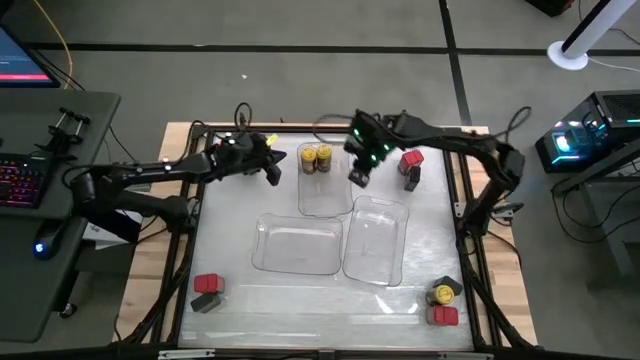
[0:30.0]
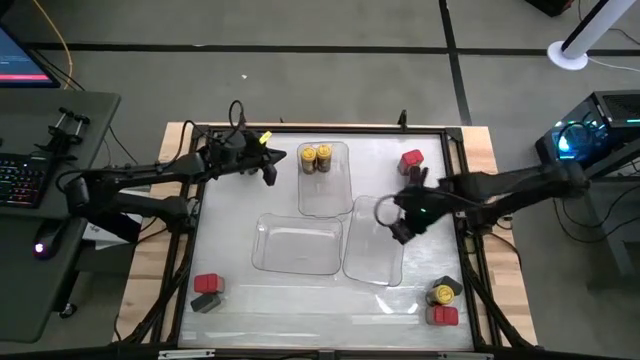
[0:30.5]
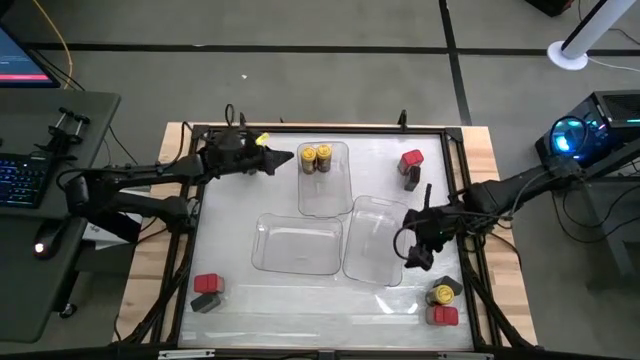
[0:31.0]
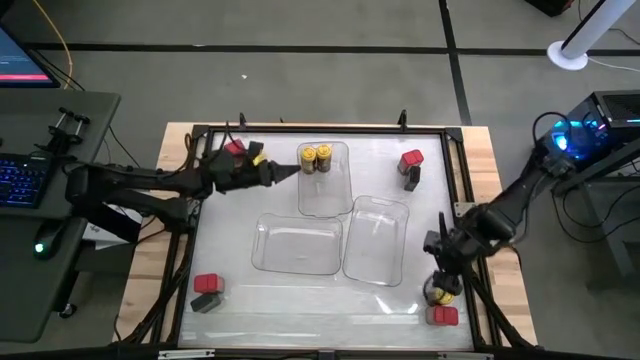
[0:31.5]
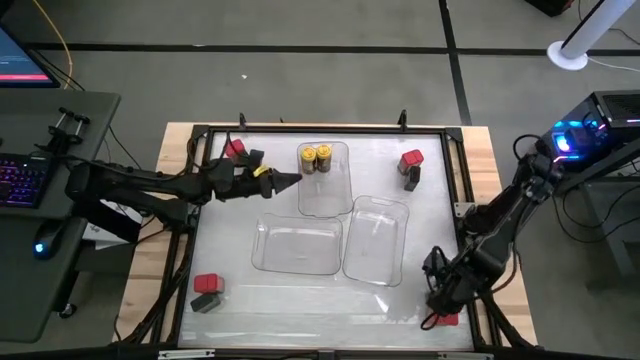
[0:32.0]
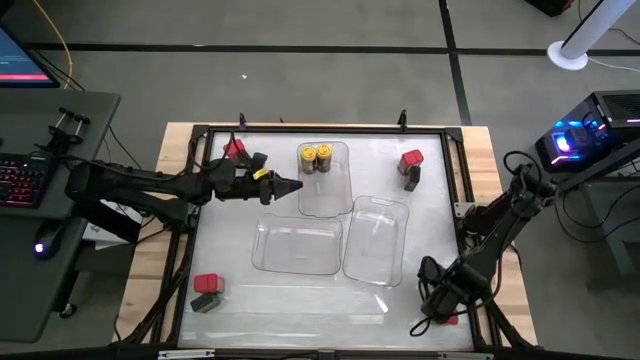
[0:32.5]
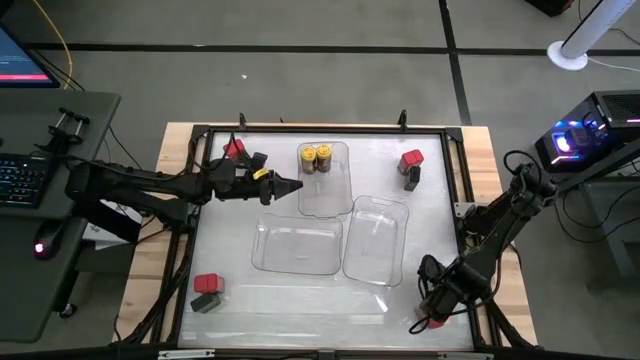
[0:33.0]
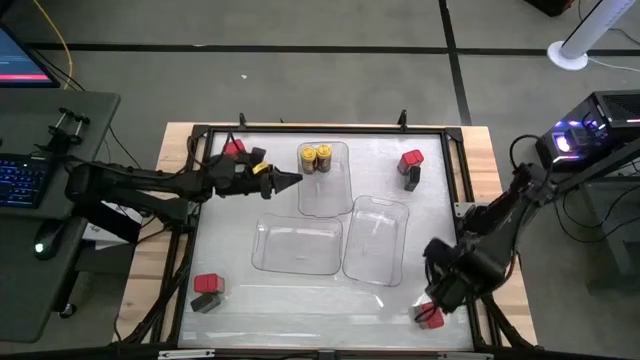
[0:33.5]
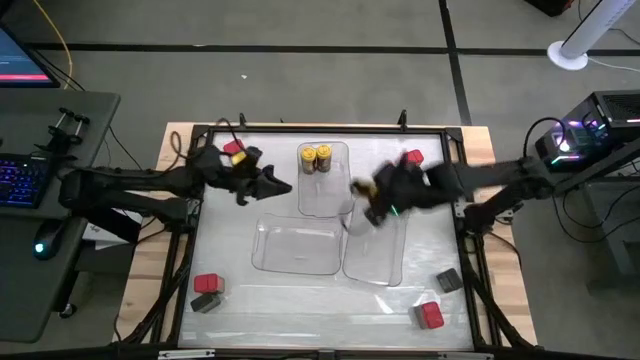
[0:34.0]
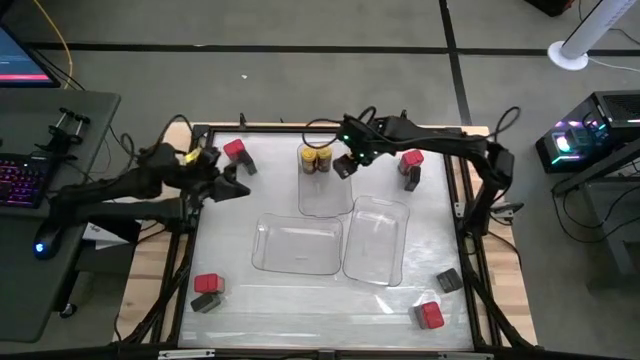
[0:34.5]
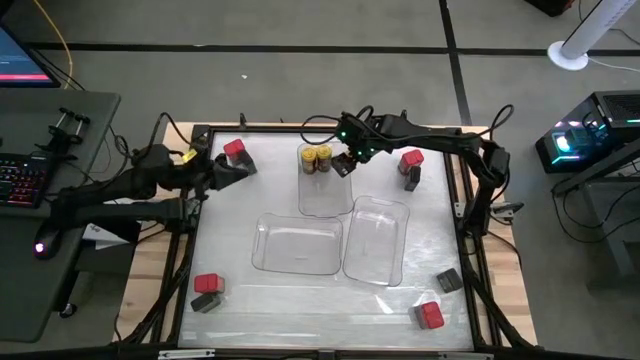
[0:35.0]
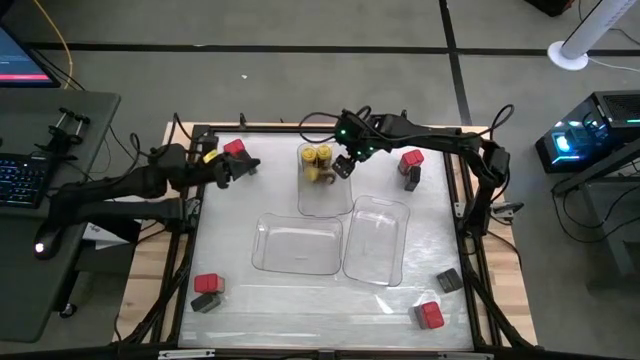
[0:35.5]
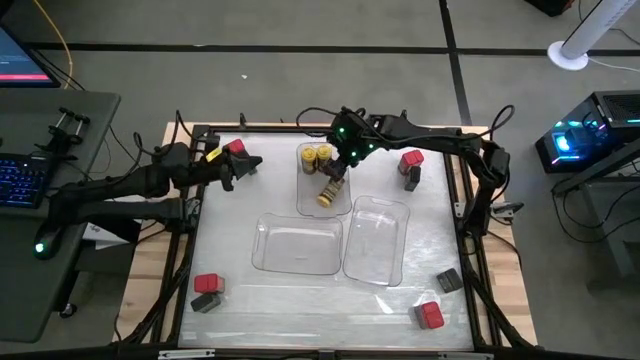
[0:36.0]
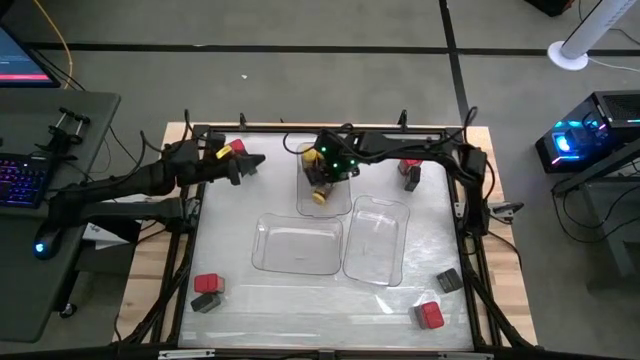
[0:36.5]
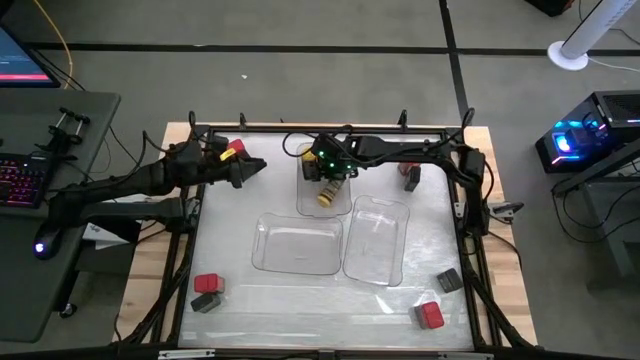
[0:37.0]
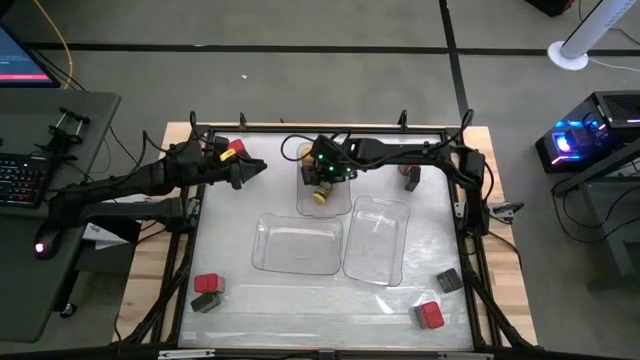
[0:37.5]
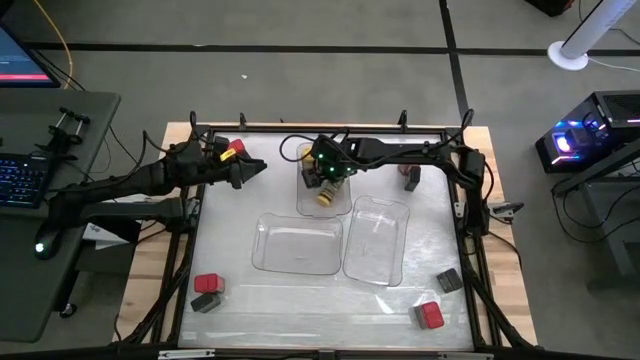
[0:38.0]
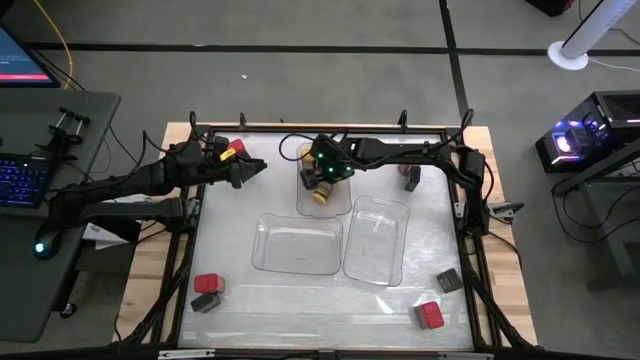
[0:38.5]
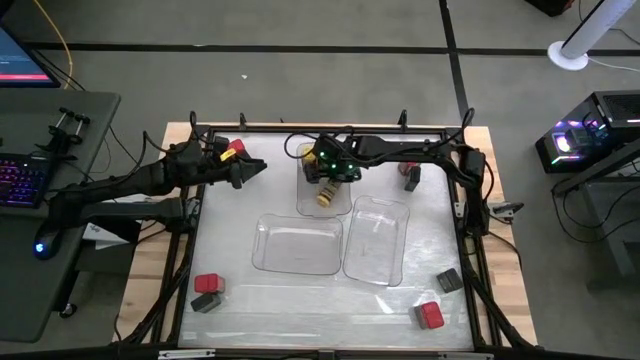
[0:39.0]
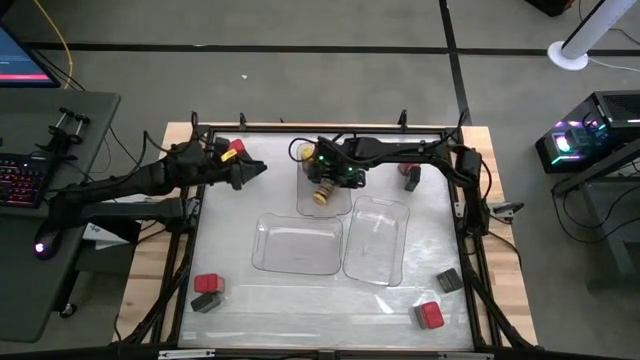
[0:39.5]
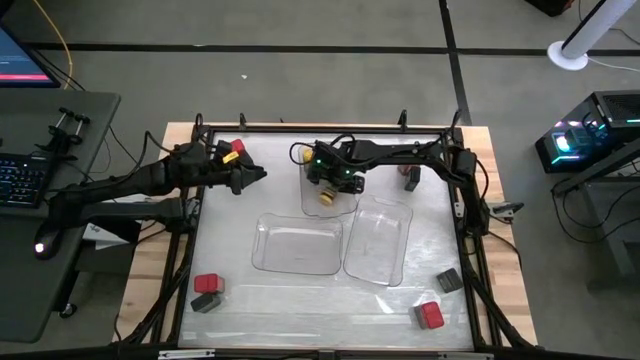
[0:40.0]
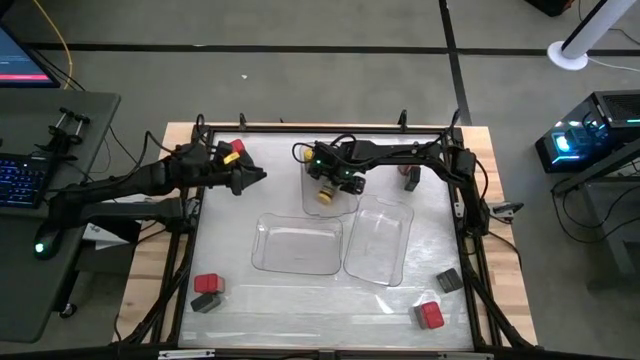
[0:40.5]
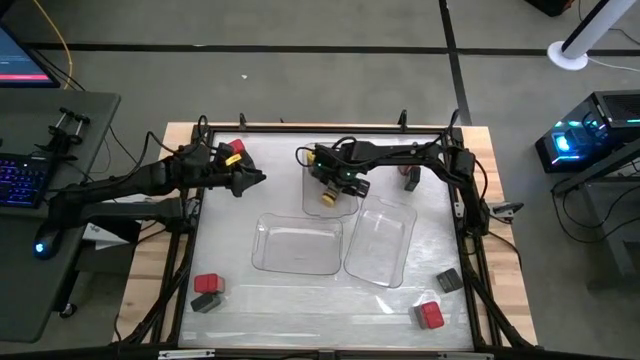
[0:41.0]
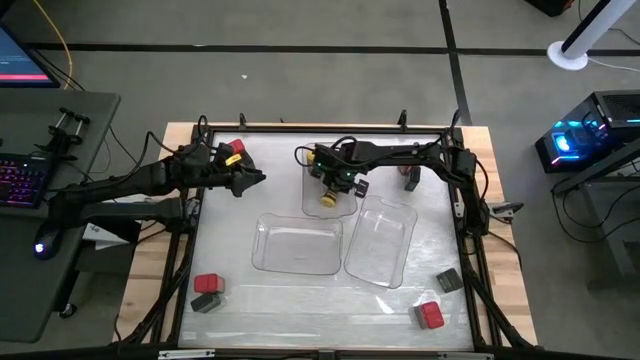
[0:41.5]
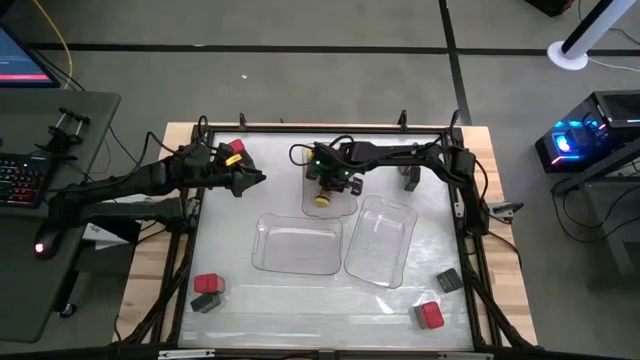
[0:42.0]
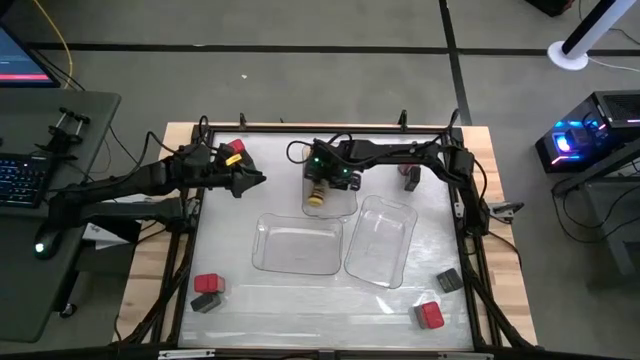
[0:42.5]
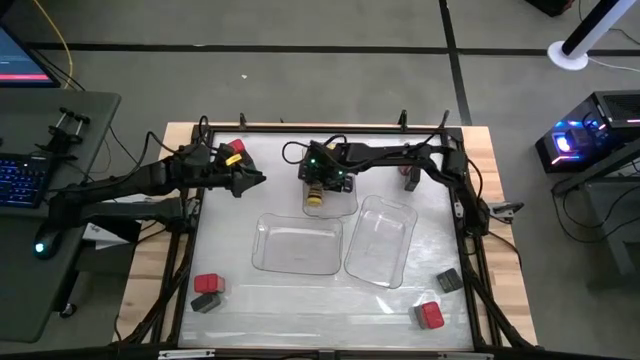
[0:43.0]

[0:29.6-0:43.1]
Task: Sort spices by type
Put the yellow seasoning bottle into the top transparent bin

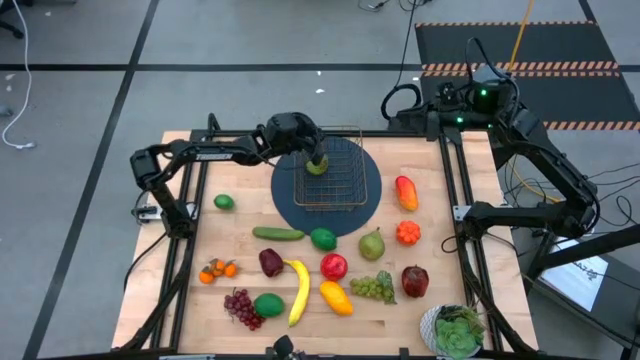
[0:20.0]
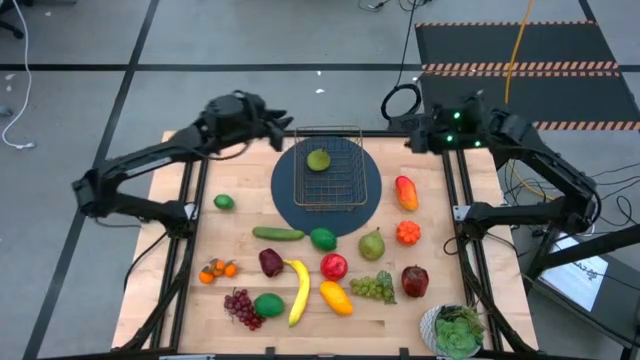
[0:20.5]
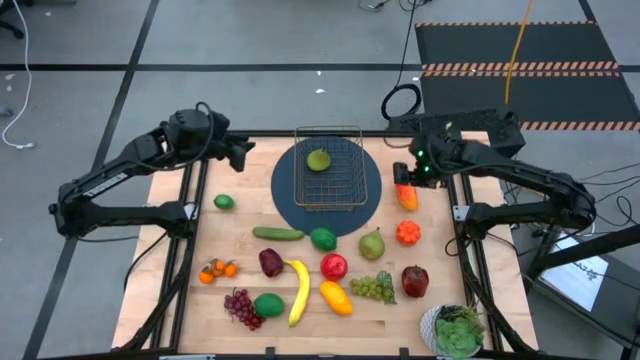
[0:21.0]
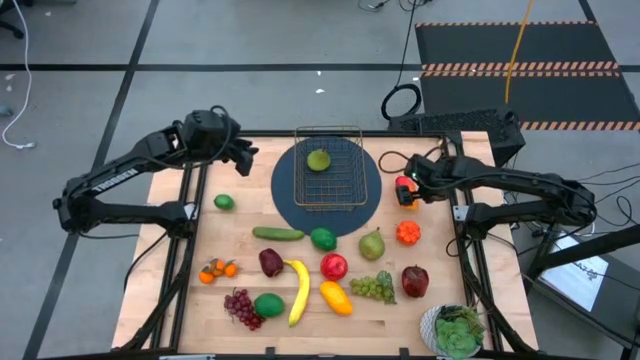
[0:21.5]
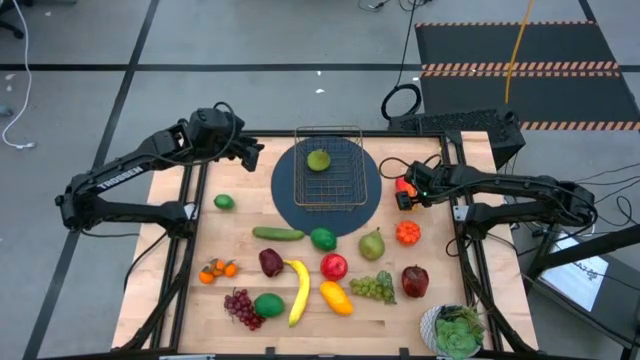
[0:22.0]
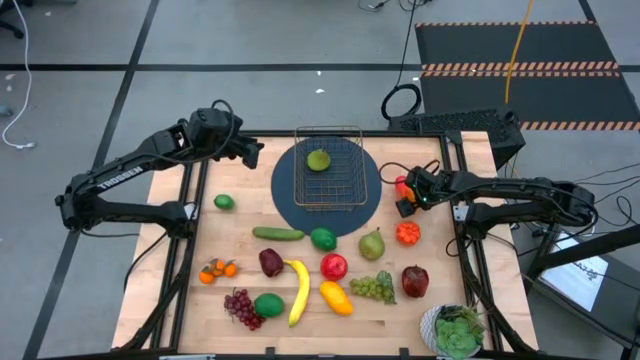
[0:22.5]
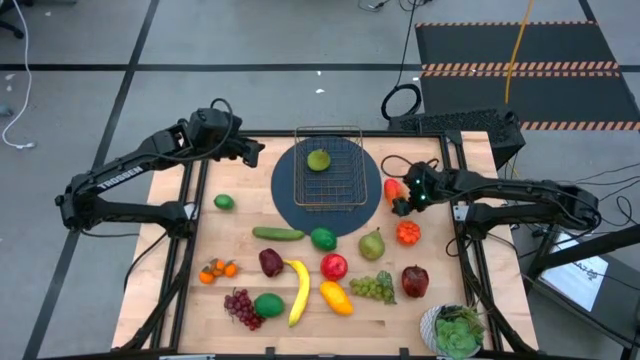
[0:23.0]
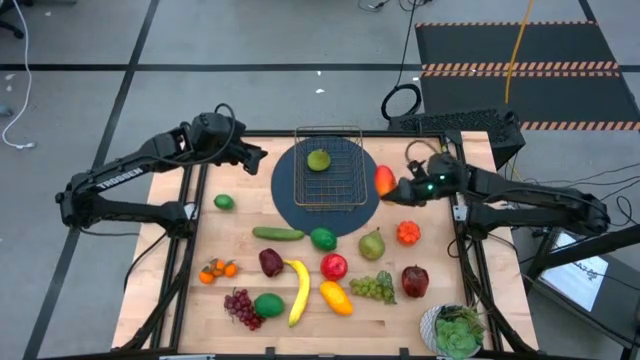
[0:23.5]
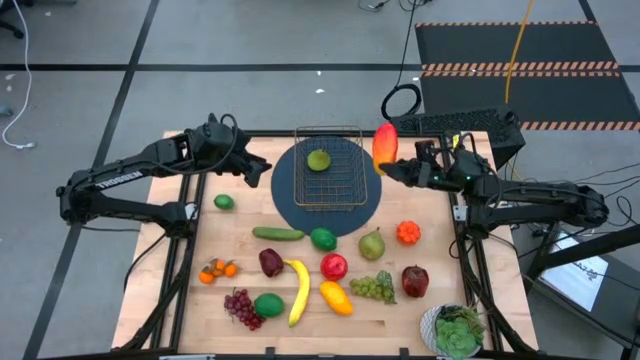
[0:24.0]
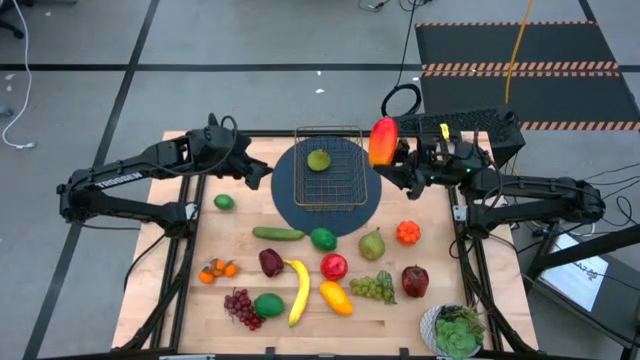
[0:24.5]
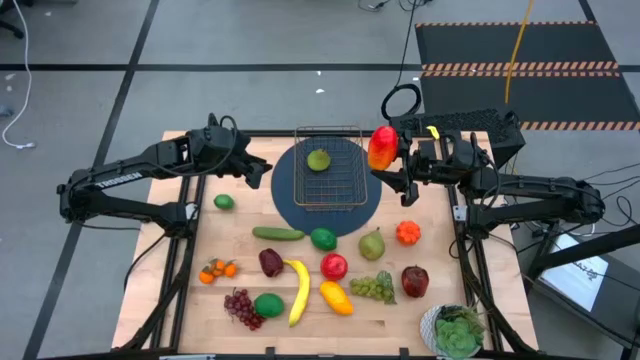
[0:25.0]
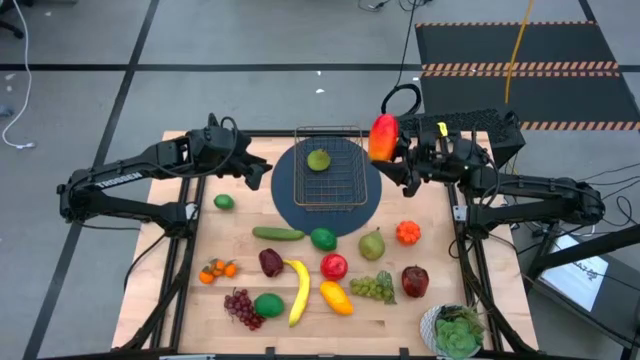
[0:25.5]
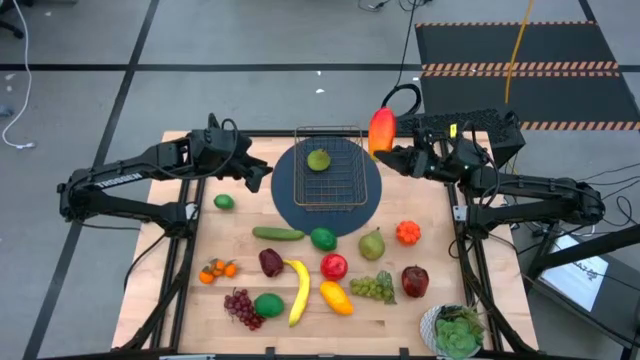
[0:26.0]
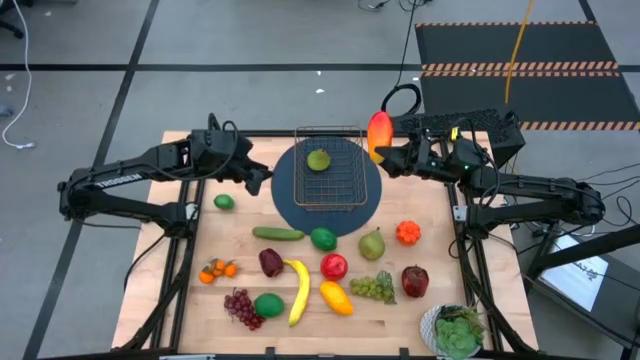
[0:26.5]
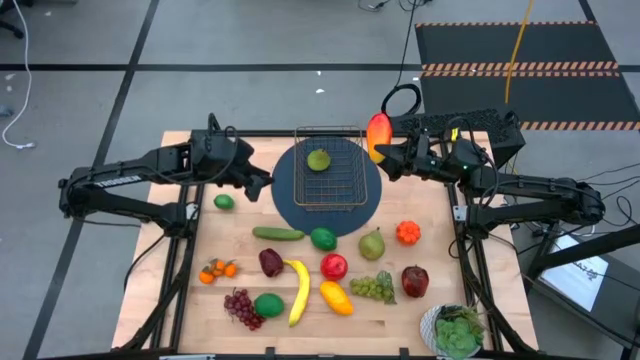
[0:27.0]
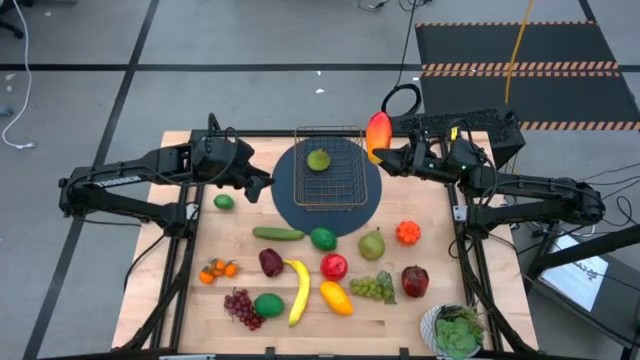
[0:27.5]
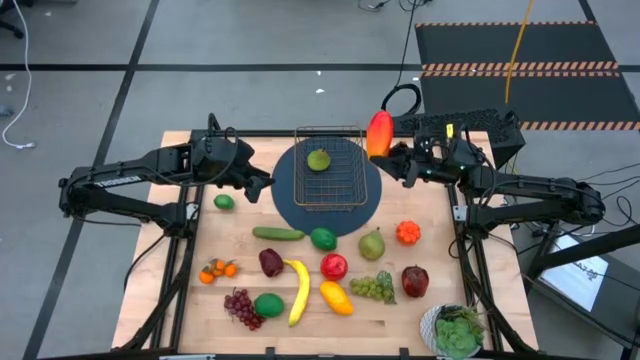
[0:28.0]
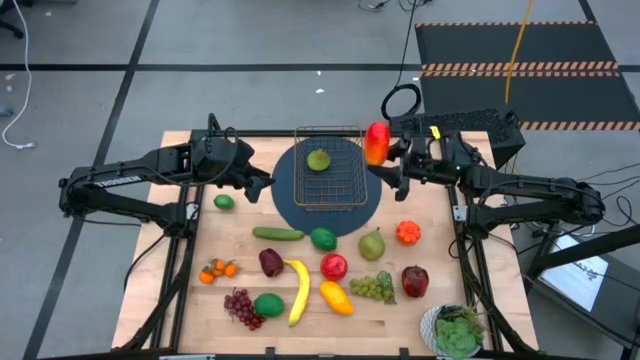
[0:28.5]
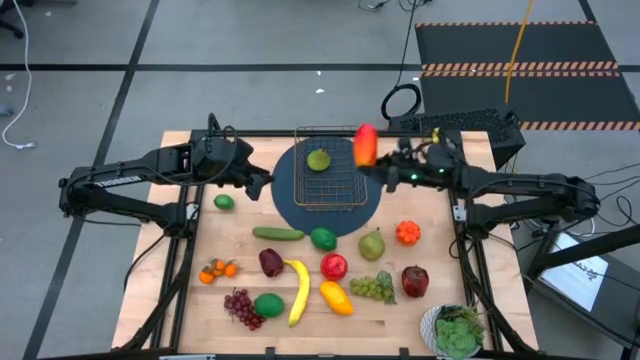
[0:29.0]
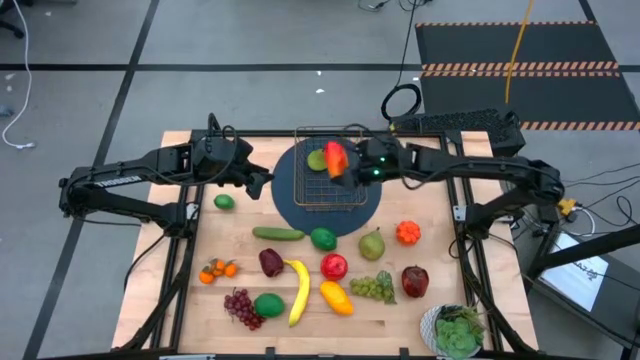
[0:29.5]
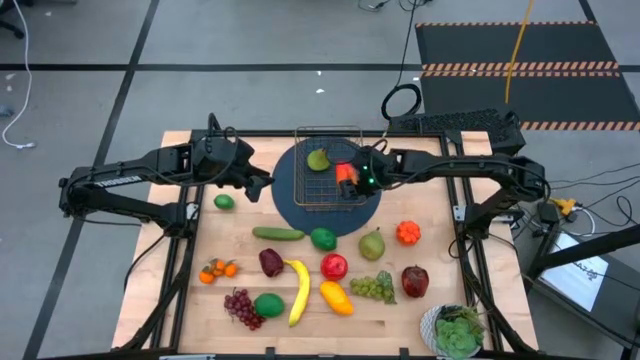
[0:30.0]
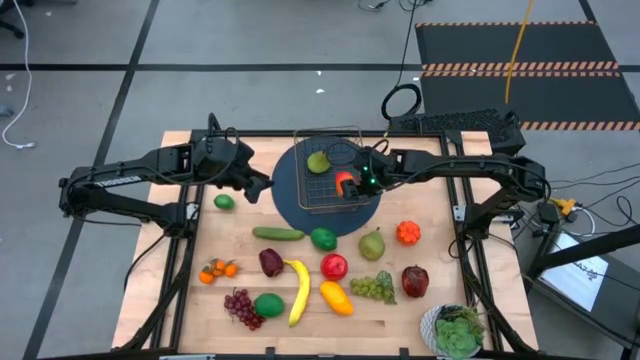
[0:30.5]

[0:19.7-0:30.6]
Task: Build produce basket
Put the red mango into the gold wire basket
